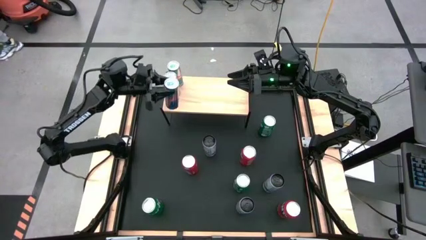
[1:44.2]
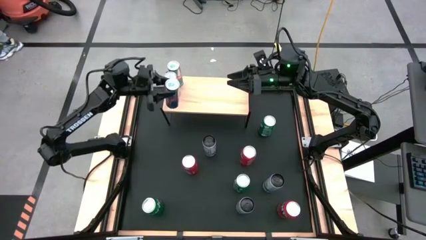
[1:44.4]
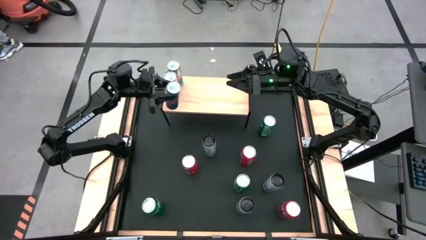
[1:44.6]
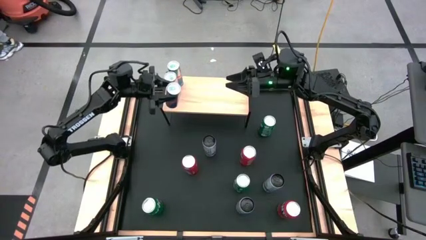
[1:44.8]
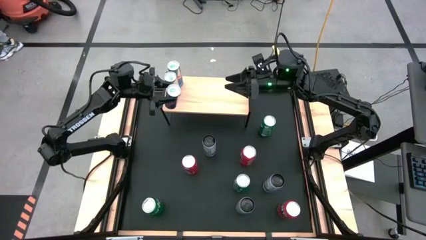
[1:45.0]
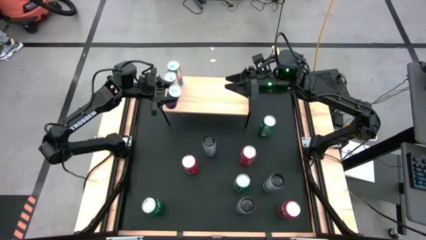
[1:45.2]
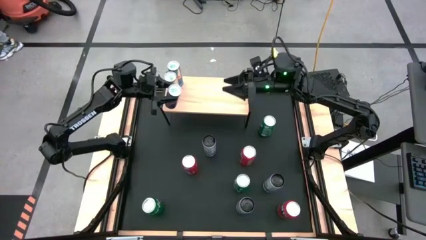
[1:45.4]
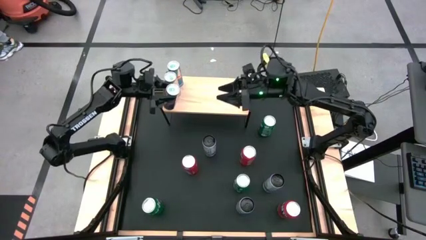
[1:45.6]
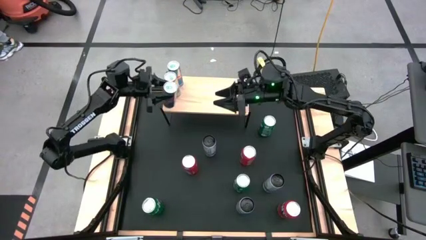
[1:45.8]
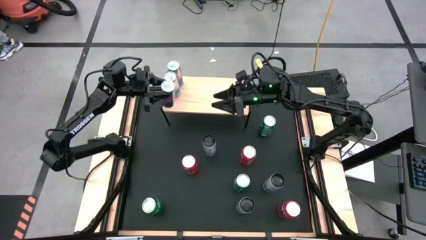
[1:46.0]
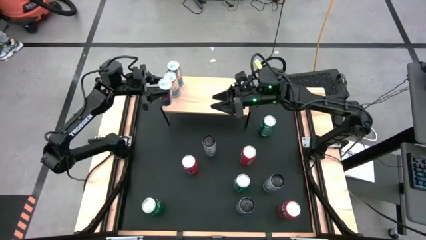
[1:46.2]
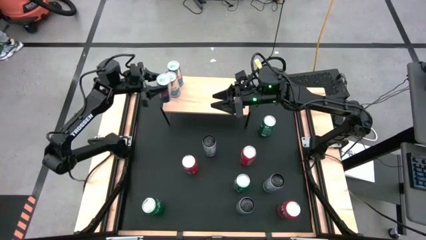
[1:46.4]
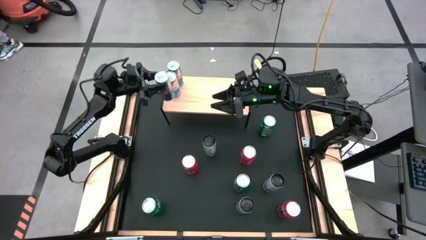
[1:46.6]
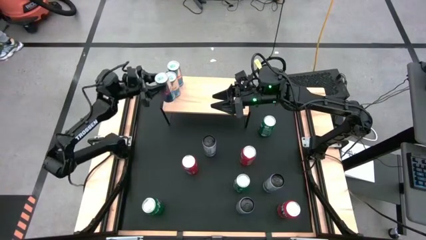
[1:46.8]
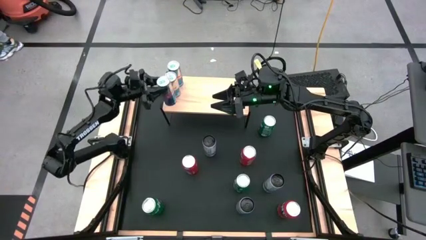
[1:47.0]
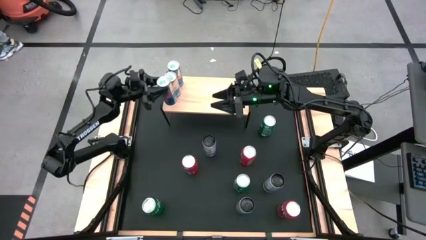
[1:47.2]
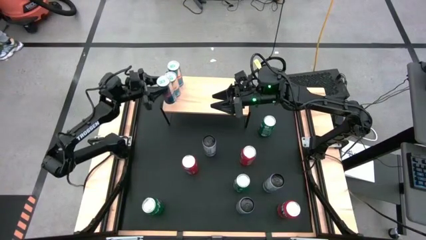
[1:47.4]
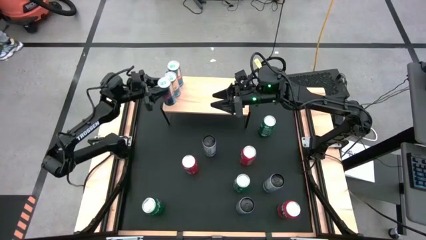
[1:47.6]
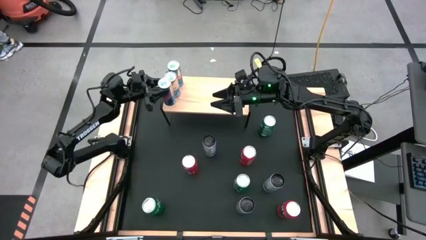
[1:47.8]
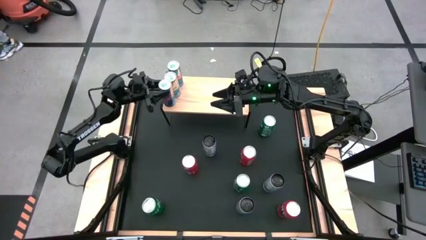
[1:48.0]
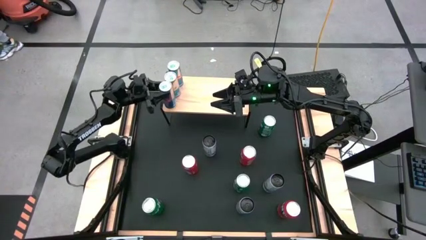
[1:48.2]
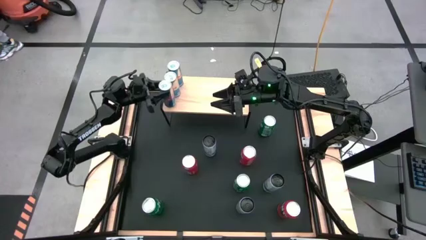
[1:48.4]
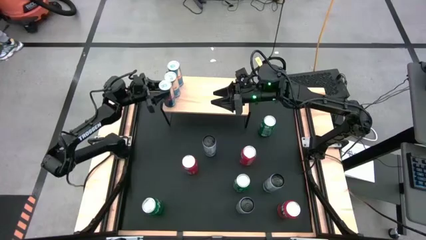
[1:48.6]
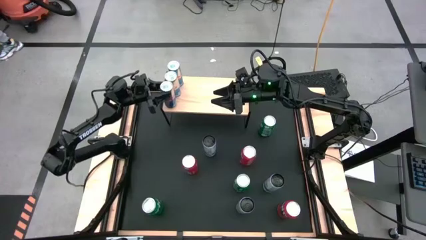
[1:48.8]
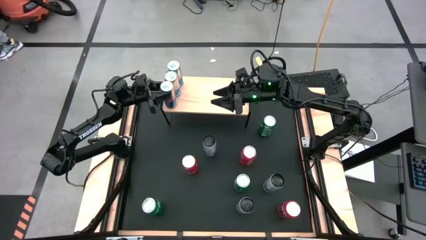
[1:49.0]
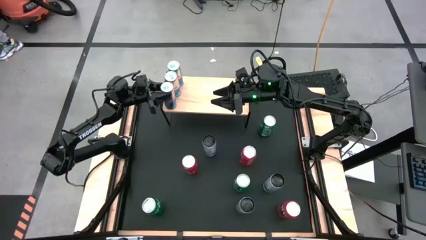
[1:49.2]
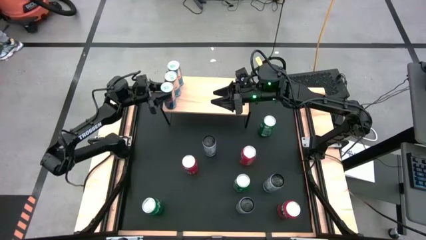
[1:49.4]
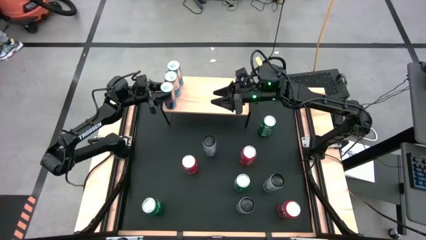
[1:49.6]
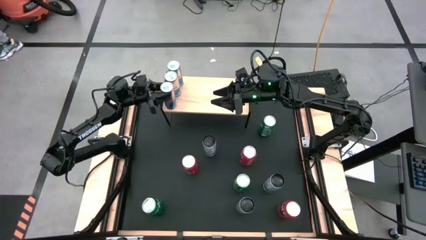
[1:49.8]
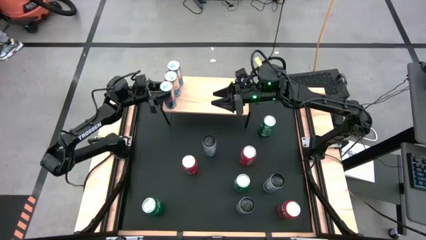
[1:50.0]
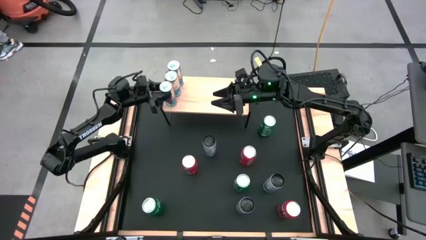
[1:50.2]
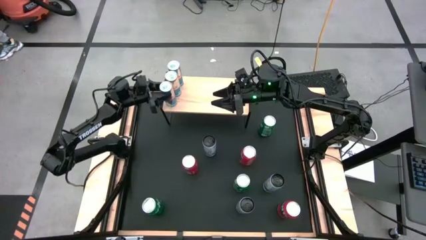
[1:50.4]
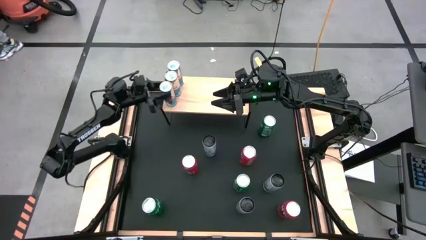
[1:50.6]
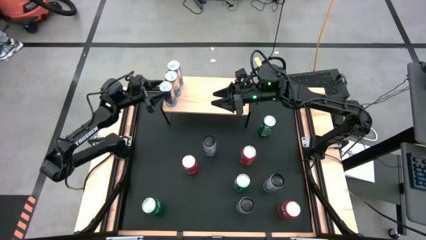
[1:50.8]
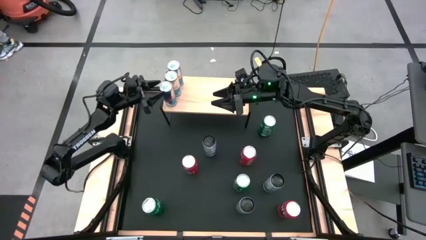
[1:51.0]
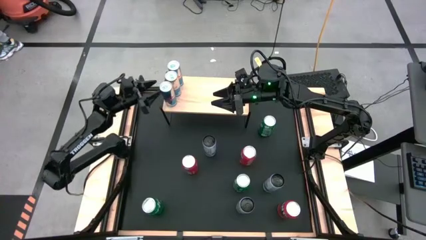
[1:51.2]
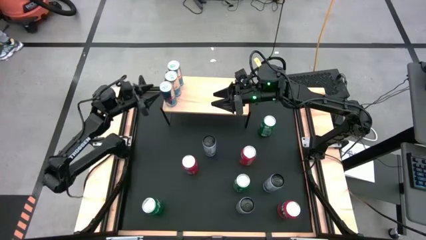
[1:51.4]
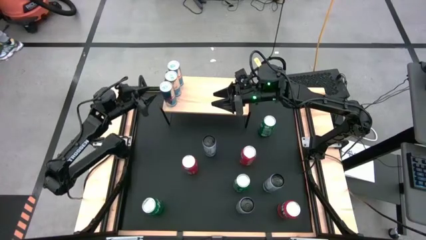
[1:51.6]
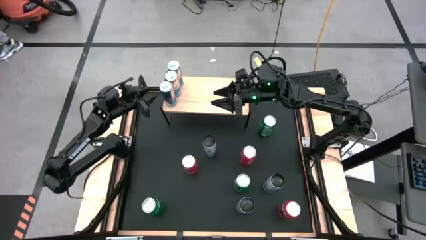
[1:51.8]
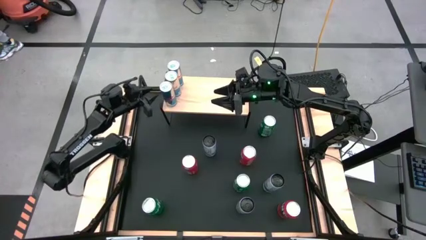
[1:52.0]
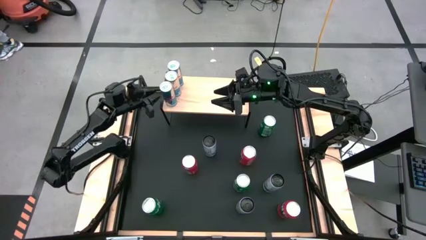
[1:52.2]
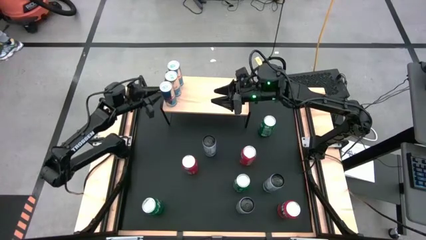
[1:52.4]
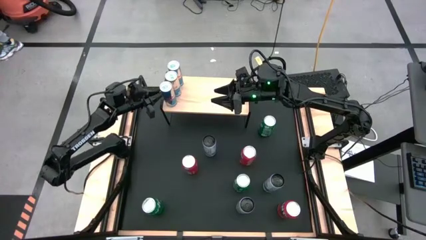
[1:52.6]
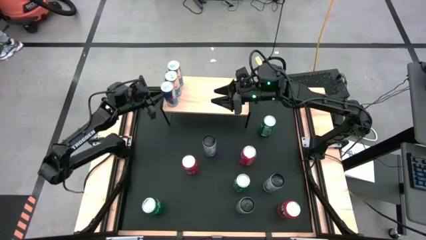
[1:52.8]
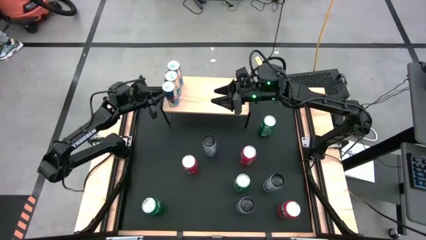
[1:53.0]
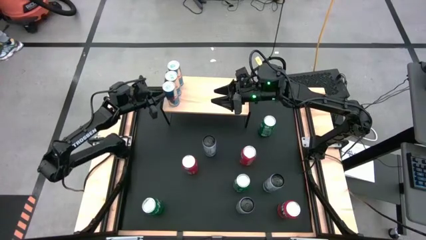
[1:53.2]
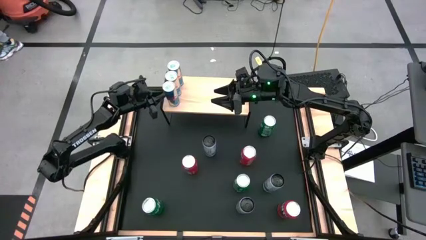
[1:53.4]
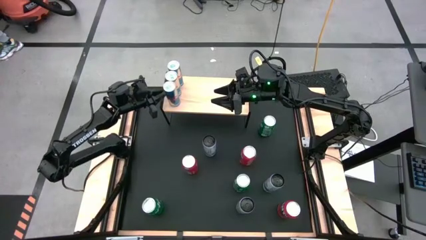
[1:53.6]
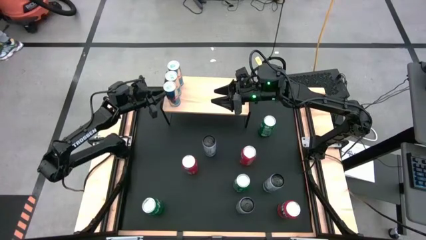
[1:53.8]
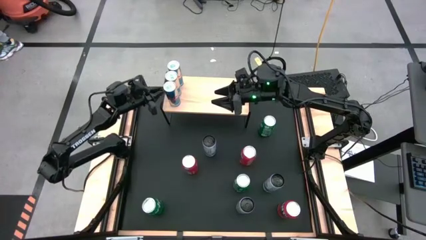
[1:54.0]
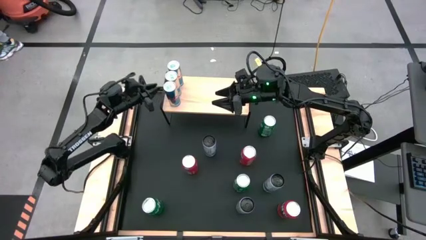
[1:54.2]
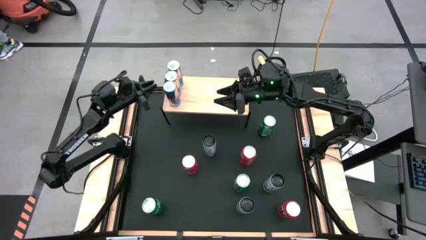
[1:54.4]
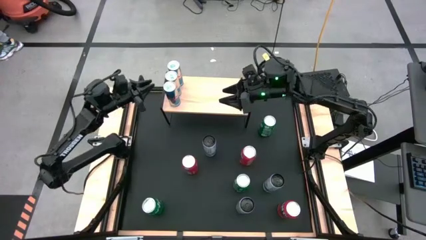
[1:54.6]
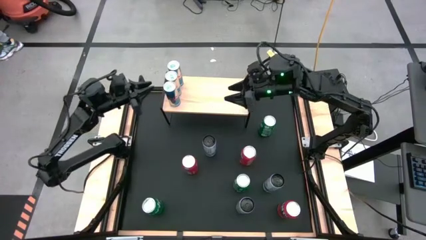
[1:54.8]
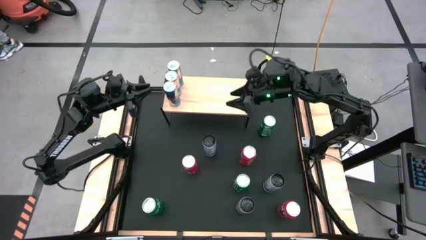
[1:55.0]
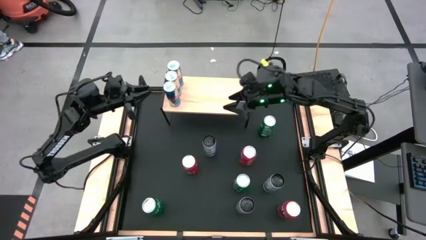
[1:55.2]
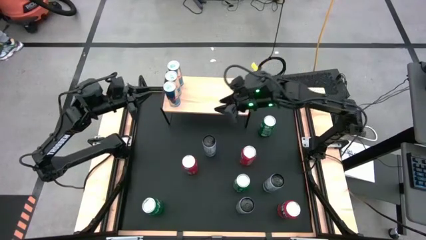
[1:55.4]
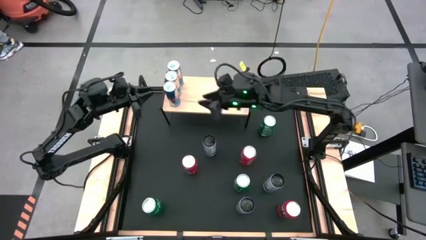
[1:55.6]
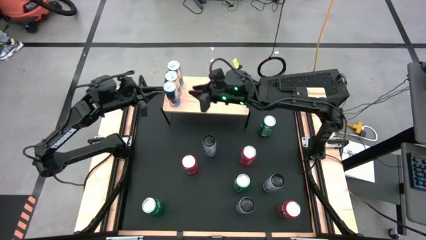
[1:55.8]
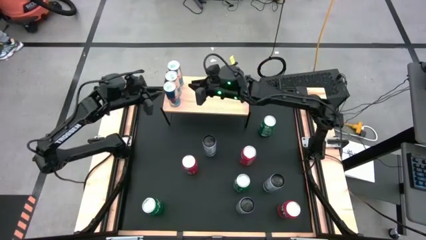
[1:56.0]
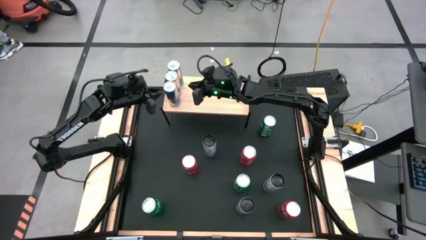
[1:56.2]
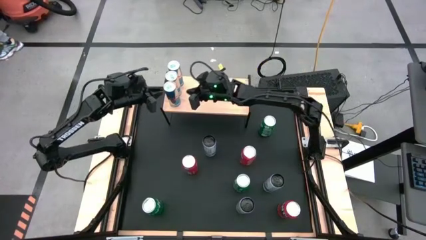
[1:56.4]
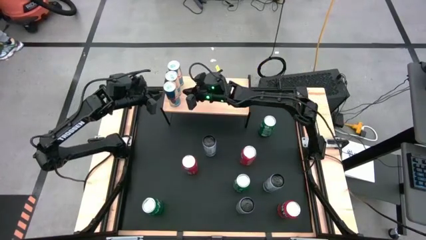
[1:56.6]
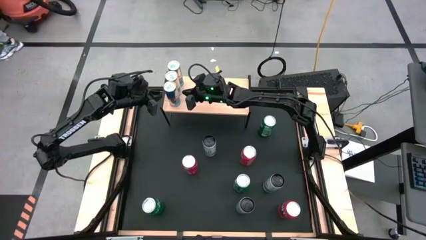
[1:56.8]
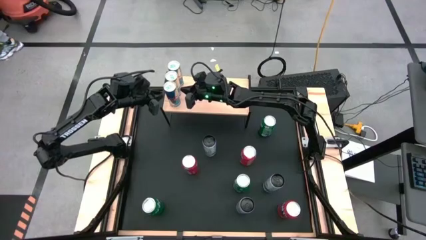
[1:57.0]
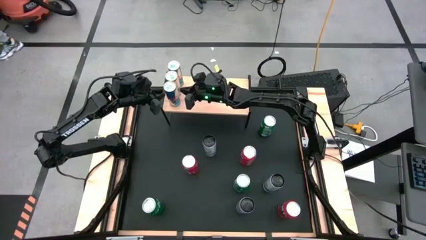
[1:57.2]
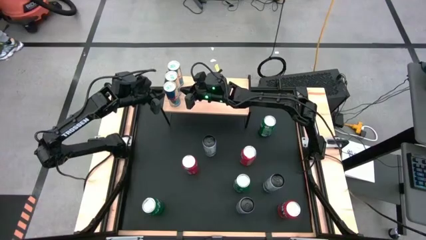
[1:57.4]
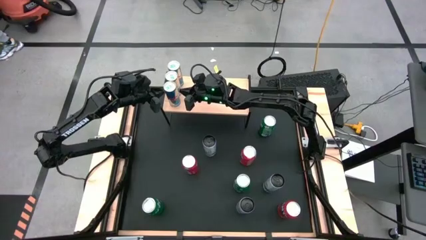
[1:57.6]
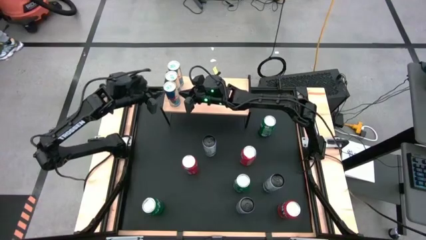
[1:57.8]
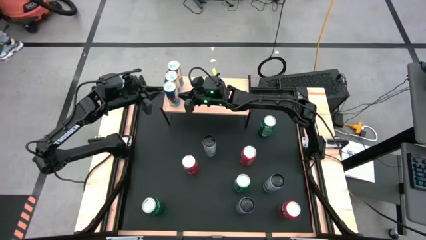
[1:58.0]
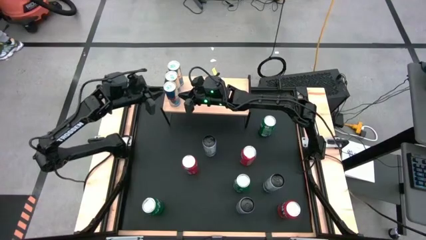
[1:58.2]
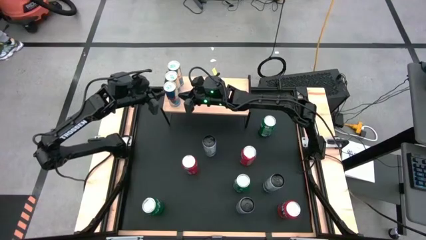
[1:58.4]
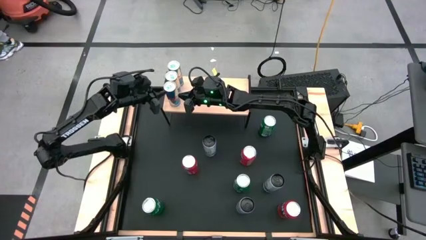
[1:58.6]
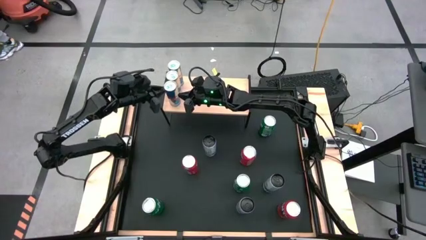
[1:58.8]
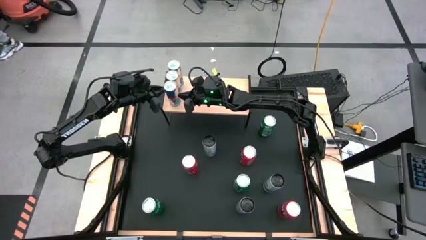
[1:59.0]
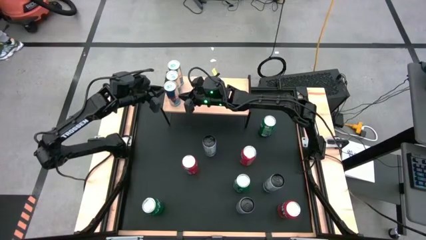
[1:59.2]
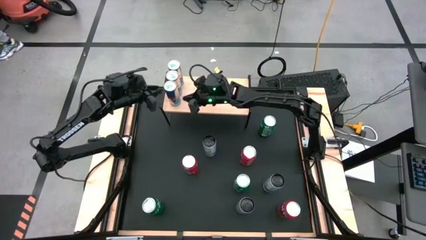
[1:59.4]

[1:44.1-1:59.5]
Task: Place canned beverage on shelf
Put the blue soda can on the shelf
